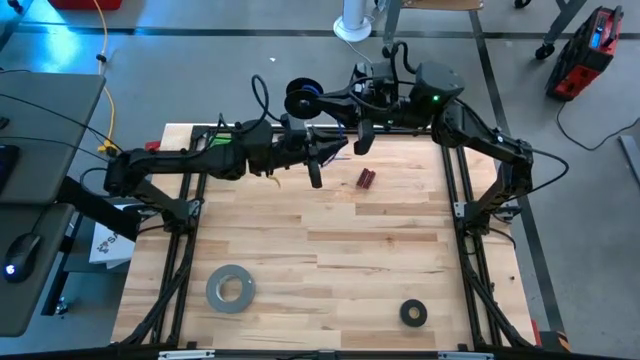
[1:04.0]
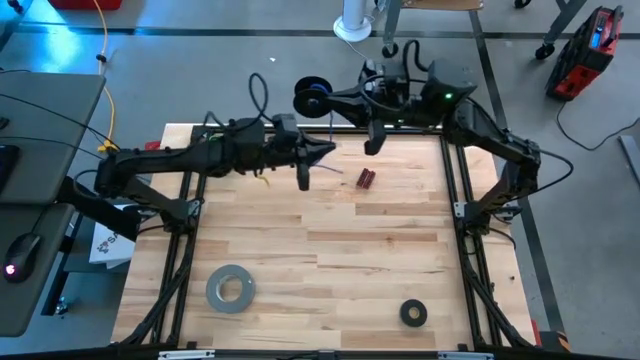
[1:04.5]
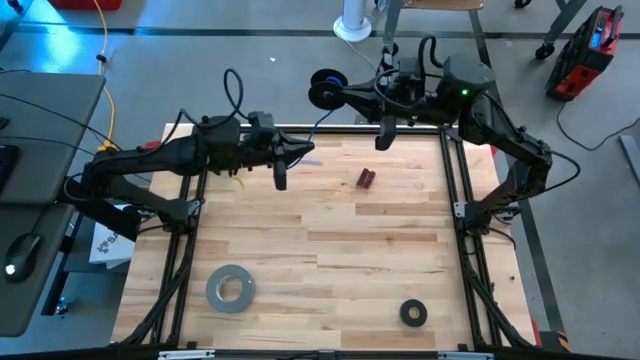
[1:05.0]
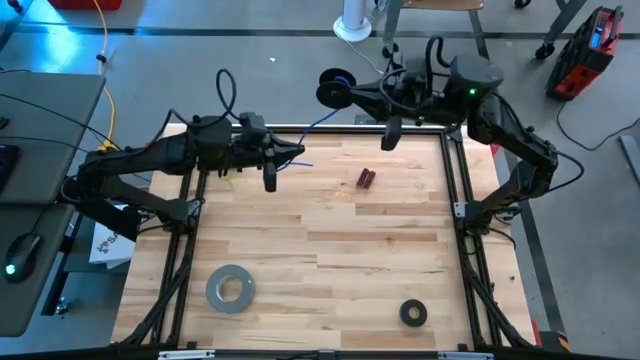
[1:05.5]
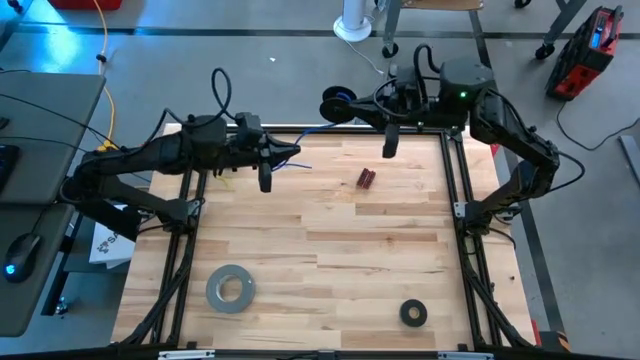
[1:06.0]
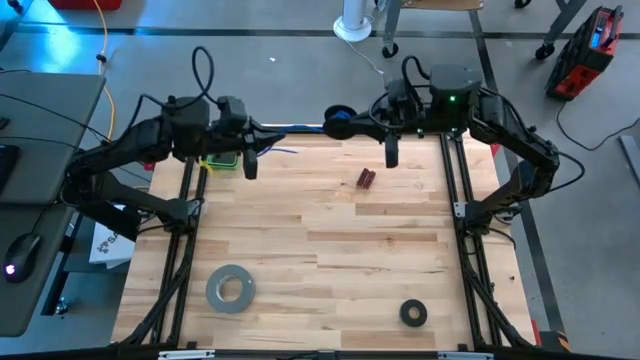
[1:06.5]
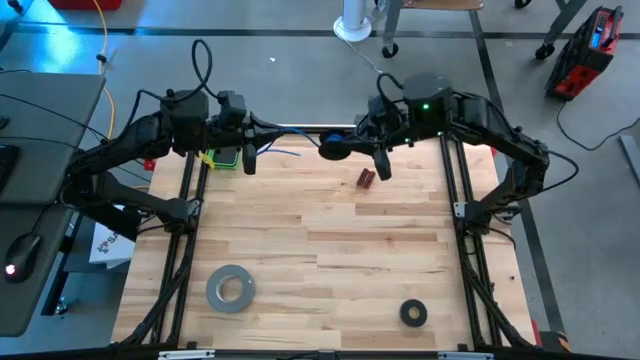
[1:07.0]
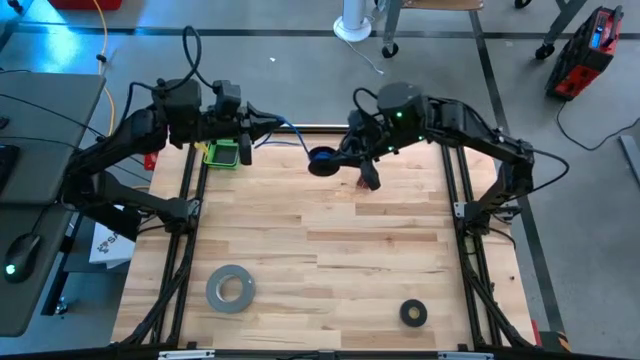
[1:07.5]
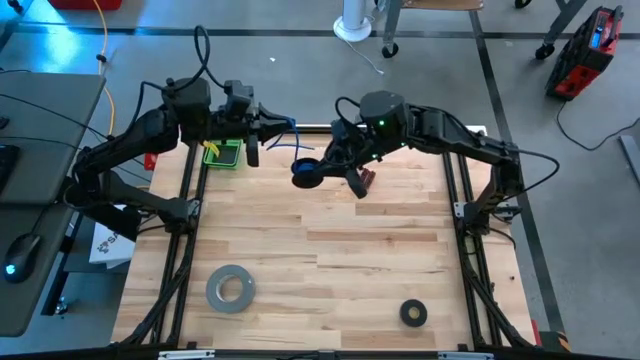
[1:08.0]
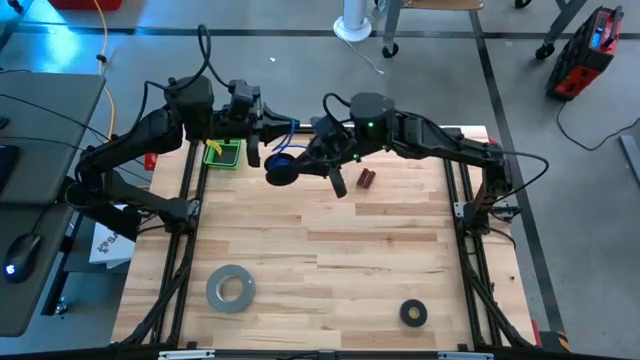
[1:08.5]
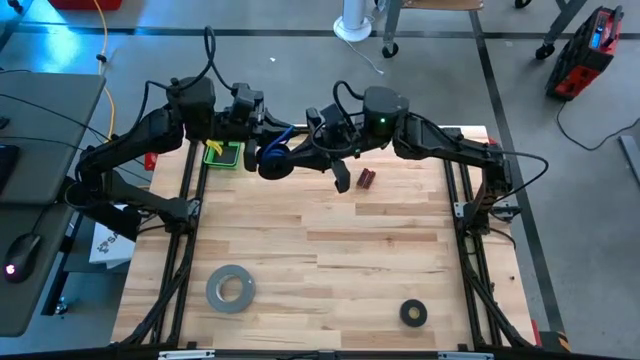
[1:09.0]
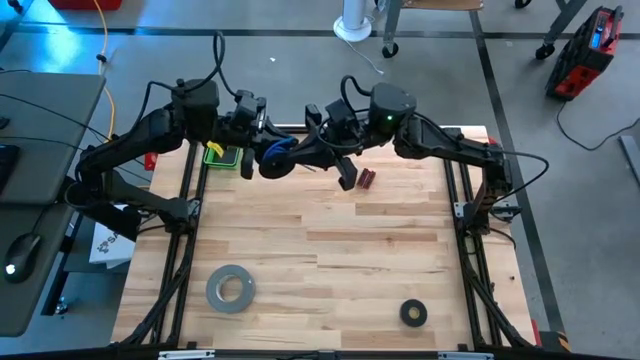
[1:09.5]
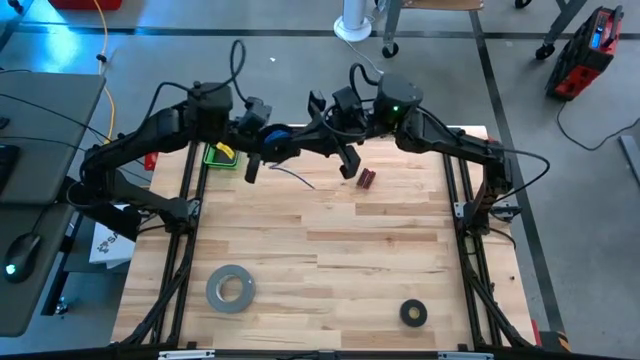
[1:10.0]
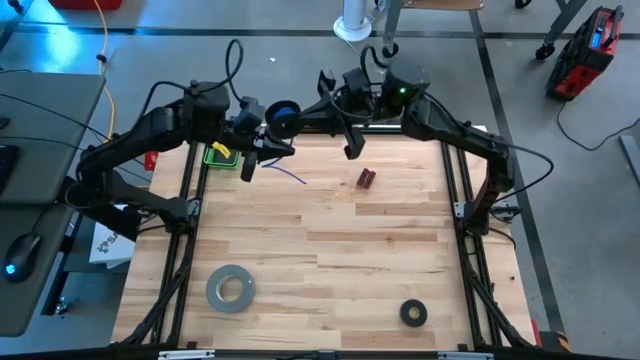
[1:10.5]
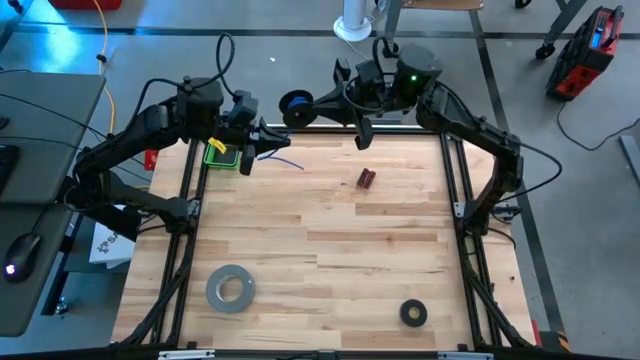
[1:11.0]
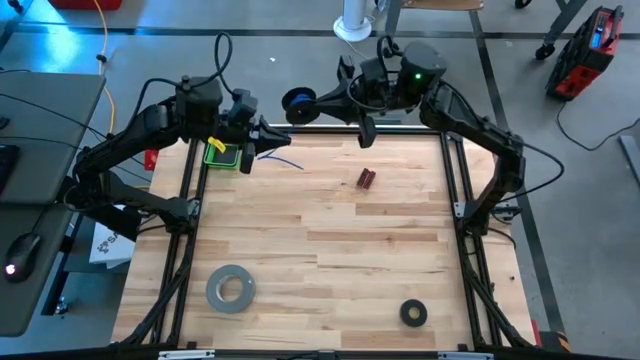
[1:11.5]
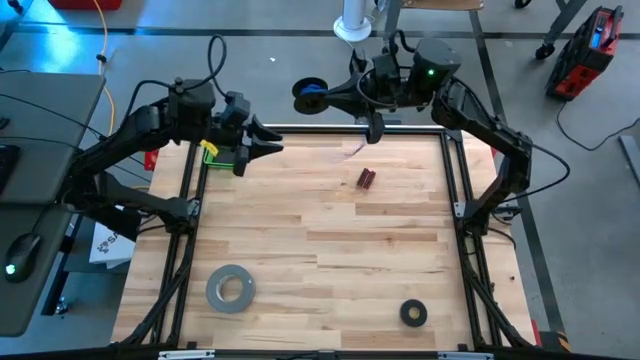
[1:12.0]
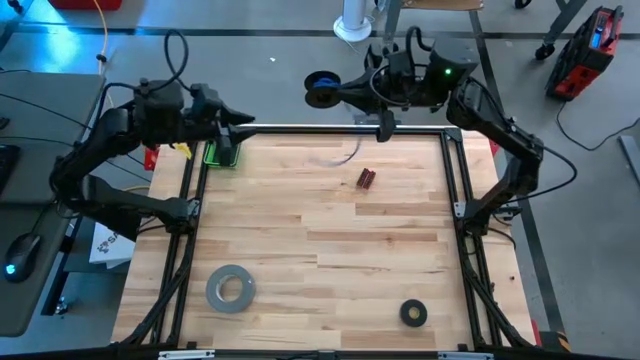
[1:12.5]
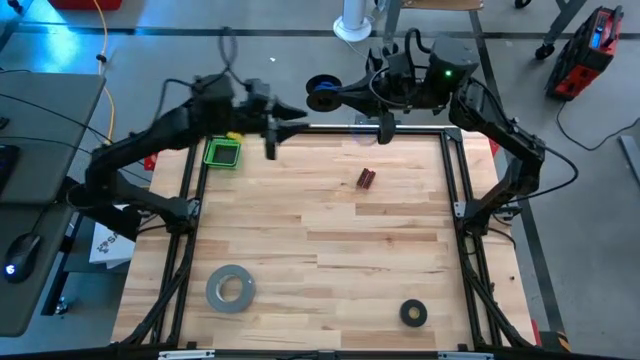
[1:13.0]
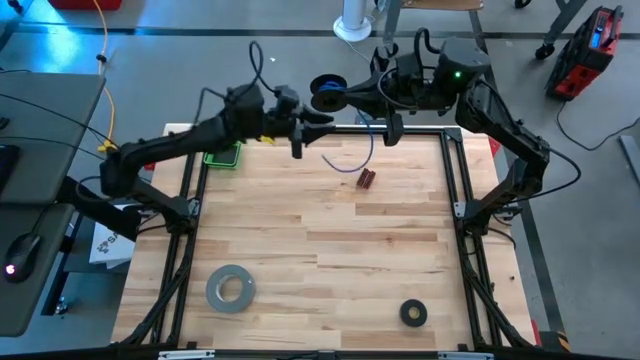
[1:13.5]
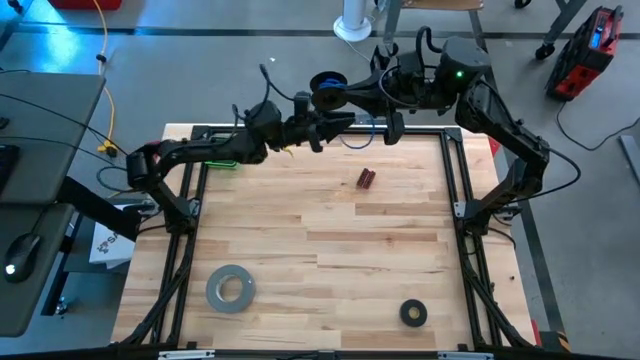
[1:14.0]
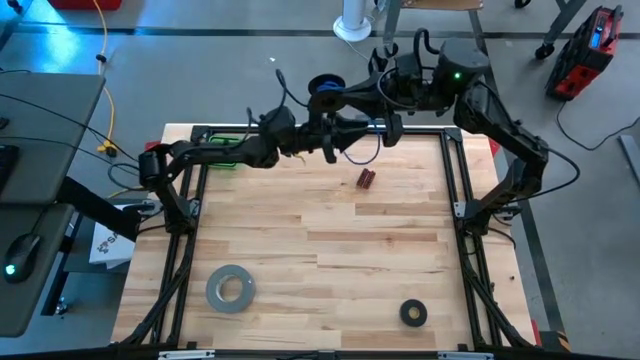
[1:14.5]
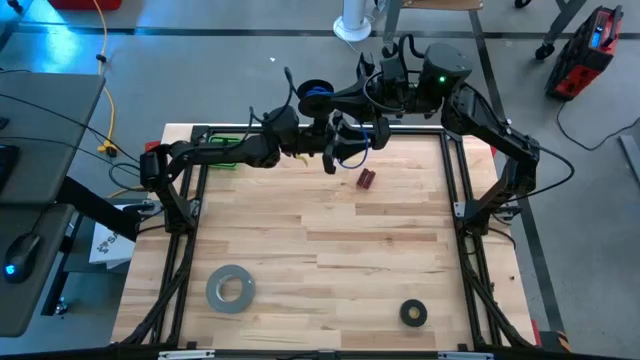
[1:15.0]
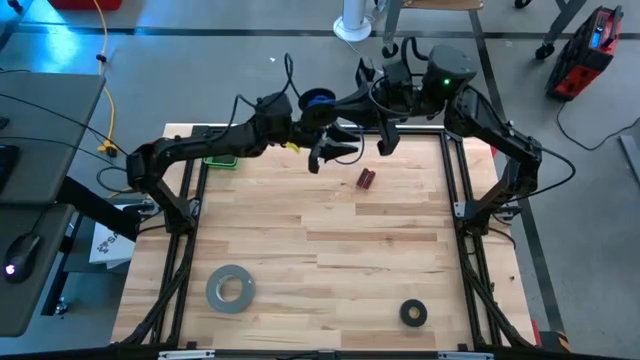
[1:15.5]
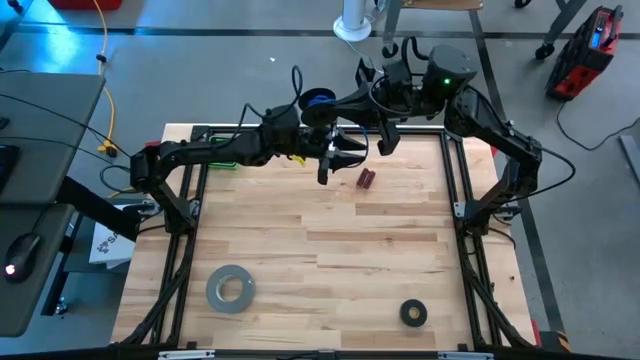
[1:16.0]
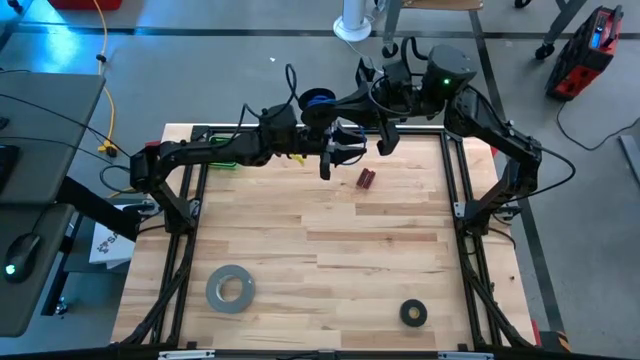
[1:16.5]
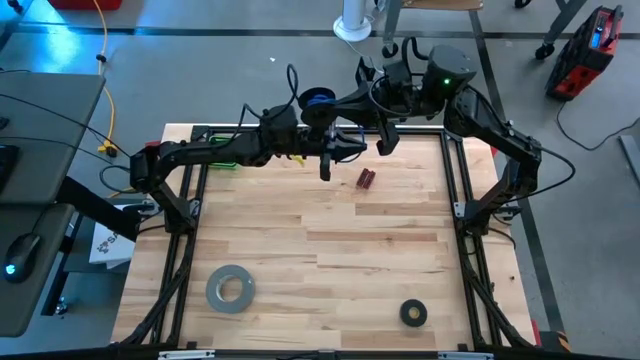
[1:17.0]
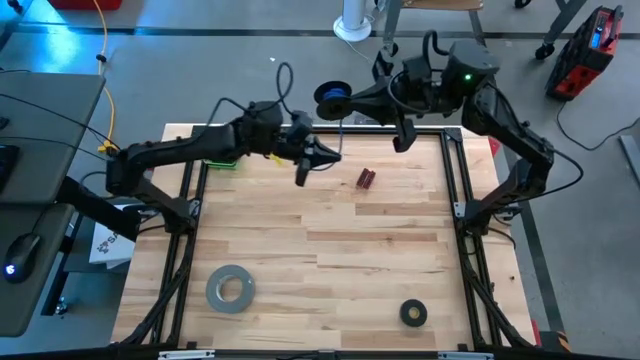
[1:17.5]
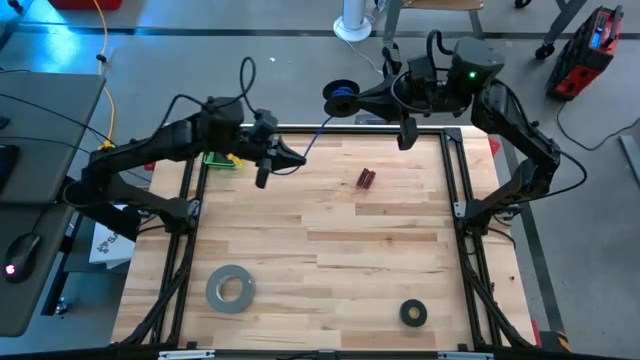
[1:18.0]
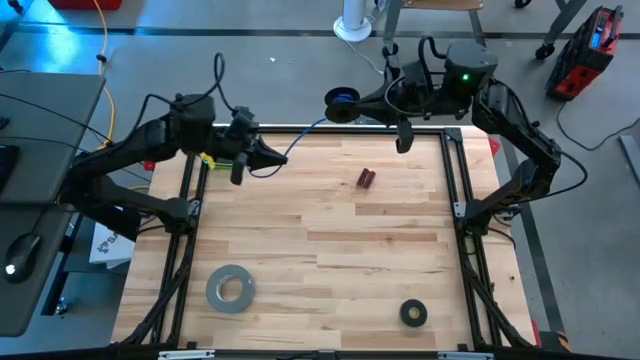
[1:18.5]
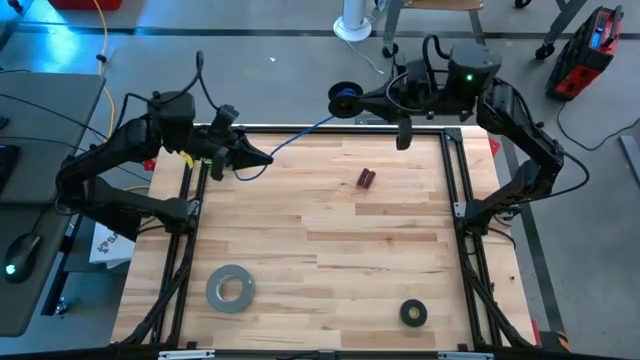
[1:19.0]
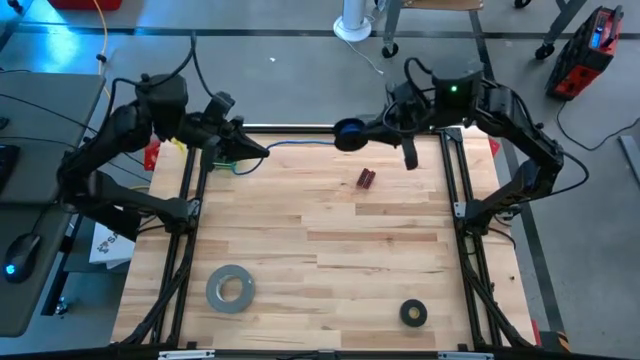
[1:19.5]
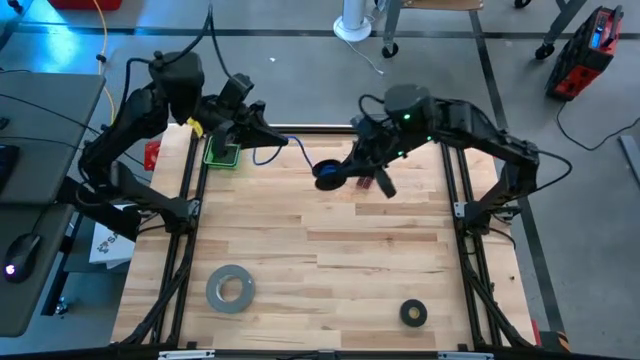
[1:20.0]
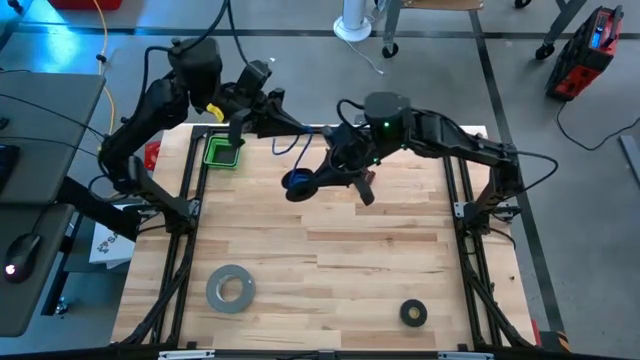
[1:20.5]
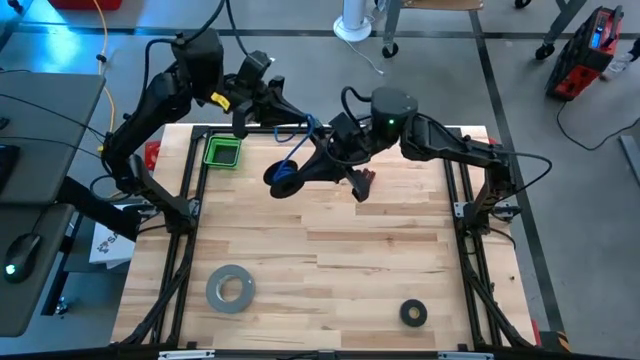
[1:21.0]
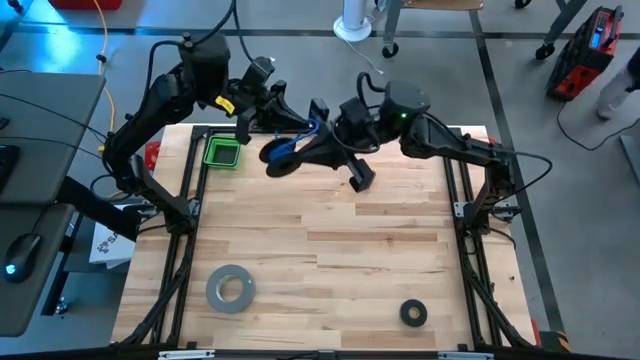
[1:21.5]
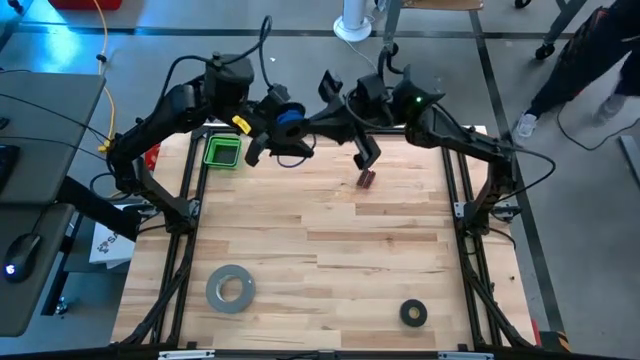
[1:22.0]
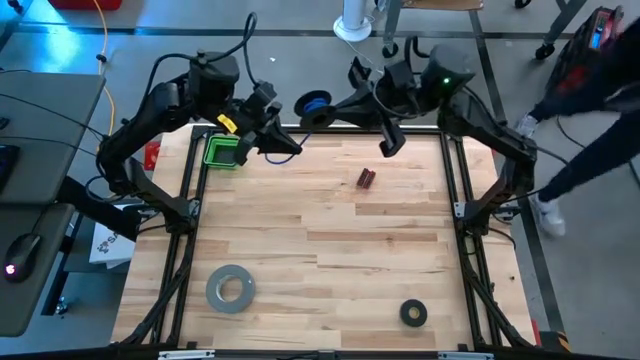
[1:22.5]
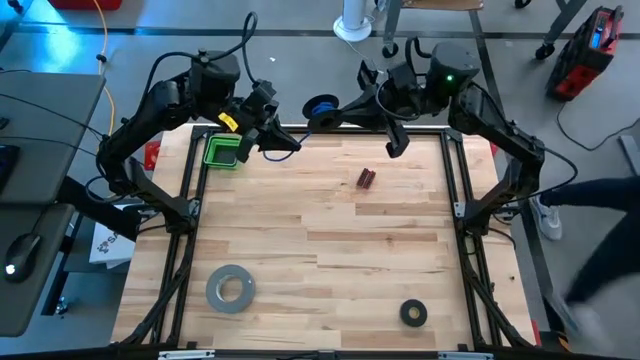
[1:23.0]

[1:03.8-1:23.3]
Task: Coil cords
Coil the blue wire onto a spool
